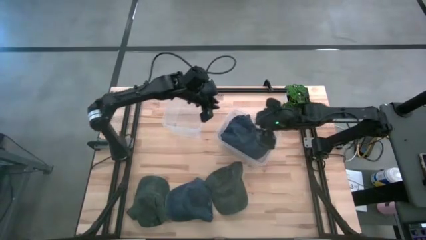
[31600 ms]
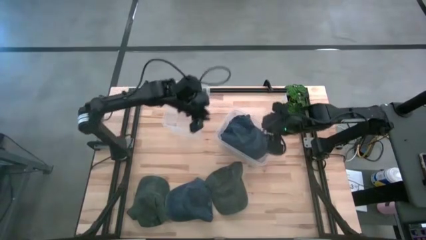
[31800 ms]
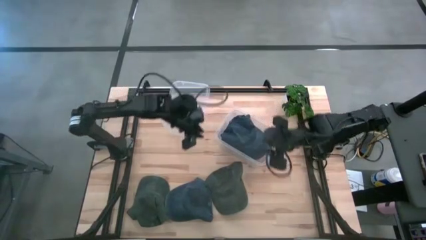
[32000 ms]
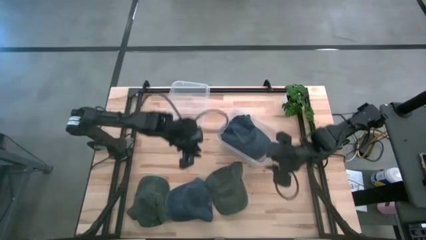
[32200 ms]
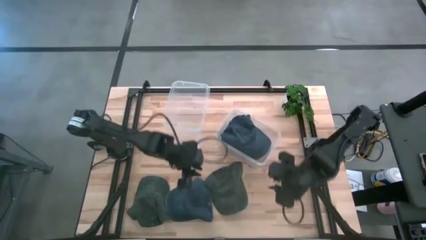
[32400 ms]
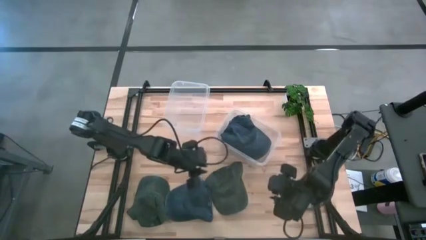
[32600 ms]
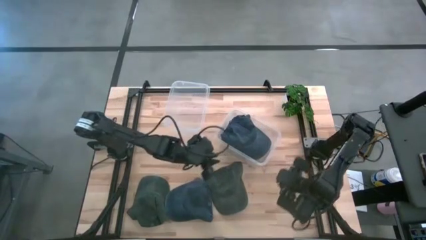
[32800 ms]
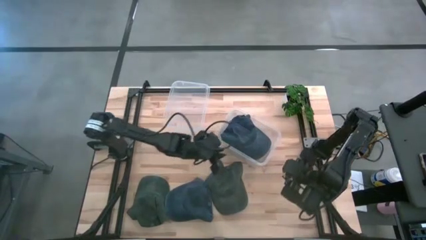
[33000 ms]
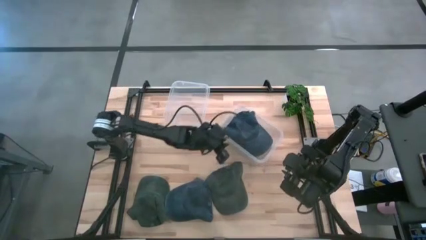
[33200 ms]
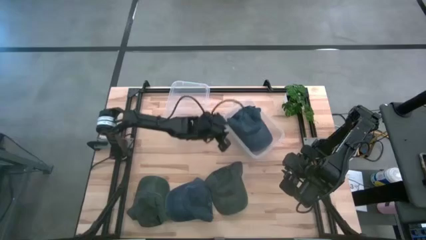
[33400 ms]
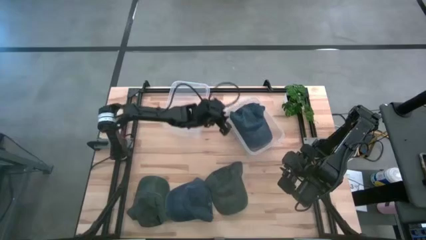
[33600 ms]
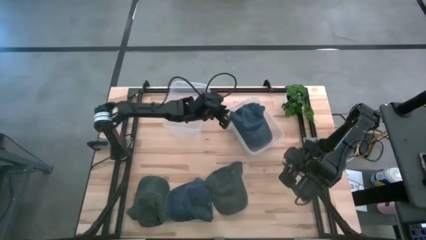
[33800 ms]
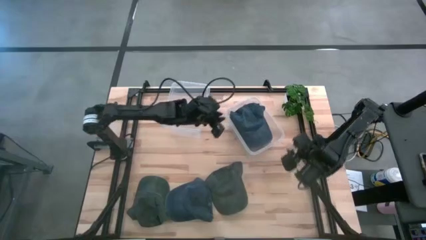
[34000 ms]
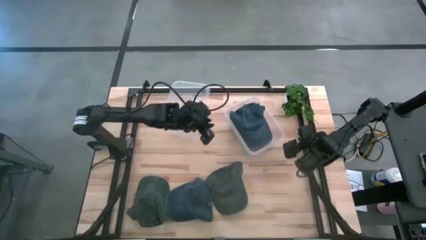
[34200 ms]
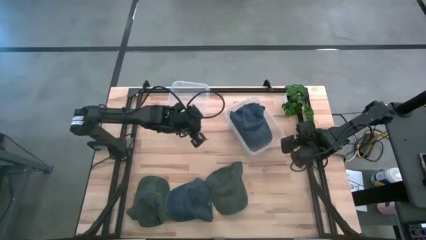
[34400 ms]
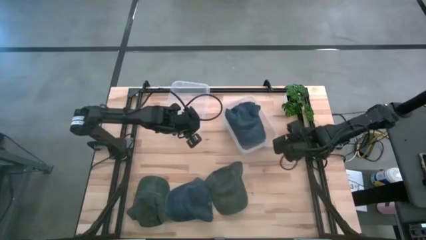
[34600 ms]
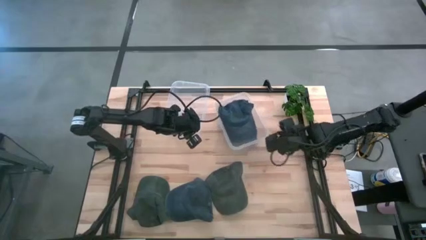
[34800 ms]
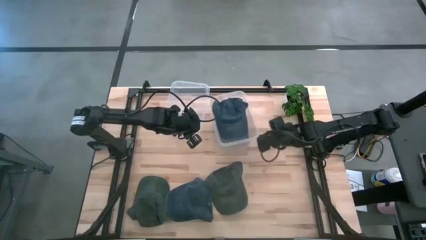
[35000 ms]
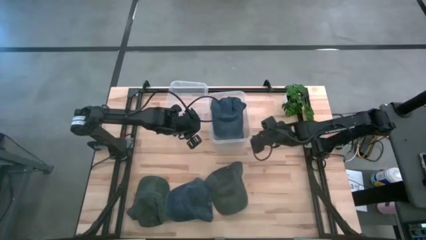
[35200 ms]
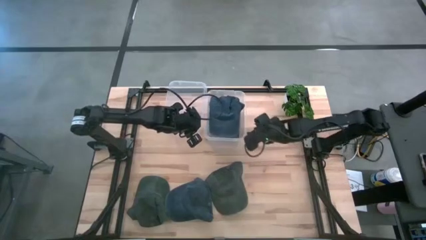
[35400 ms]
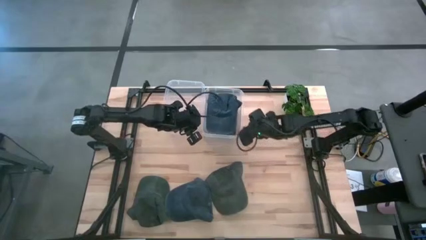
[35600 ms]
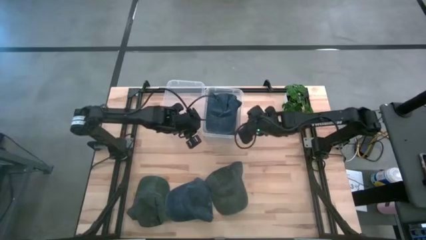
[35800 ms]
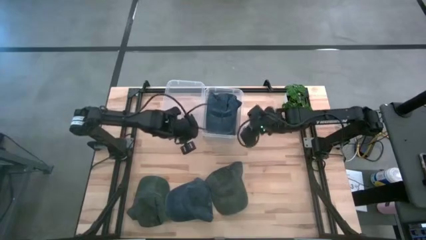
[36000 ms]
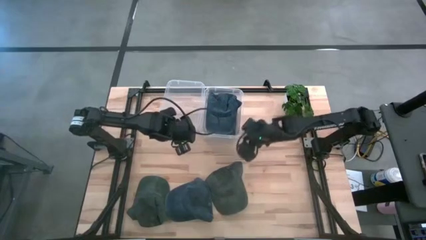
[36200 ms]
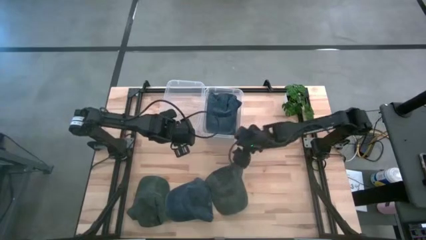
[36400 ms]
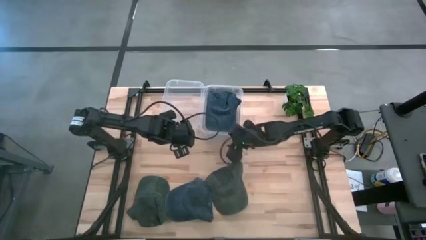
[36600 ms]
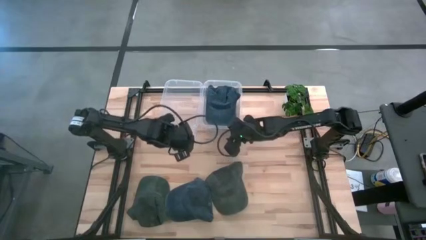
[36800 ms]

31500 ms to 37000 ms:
Task: Pick & Place hat
Adjust the right transparent bin on the table

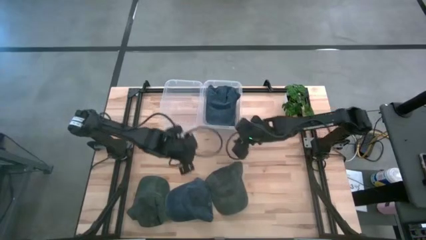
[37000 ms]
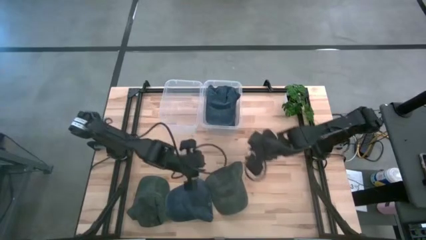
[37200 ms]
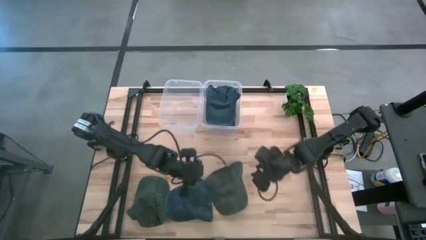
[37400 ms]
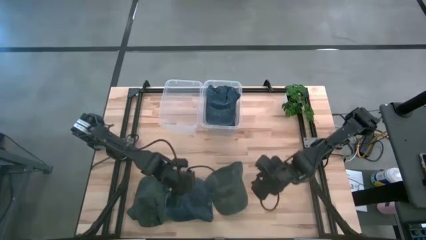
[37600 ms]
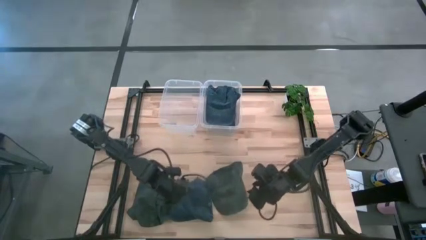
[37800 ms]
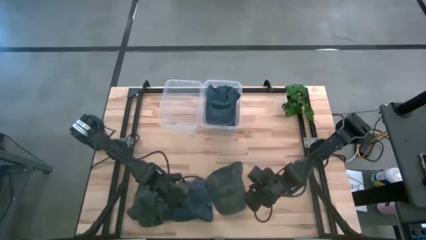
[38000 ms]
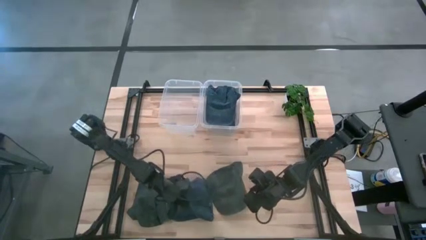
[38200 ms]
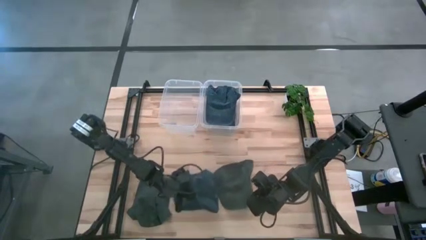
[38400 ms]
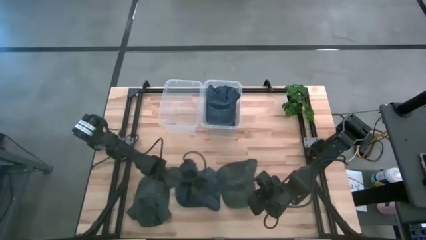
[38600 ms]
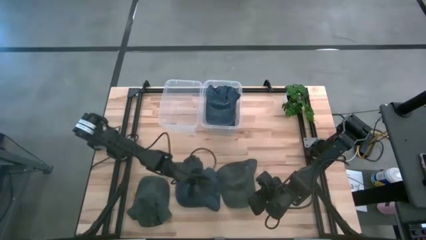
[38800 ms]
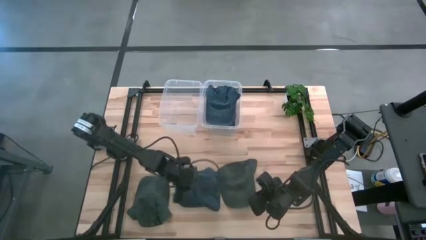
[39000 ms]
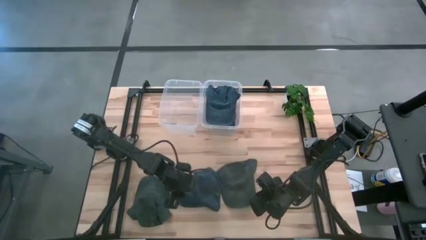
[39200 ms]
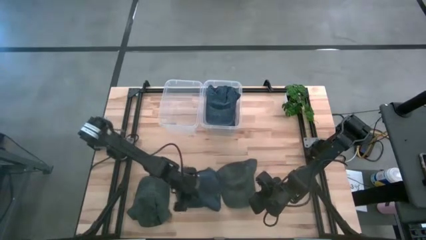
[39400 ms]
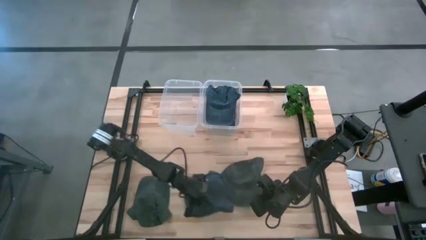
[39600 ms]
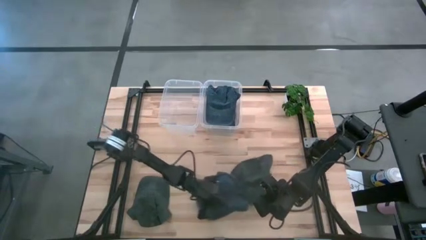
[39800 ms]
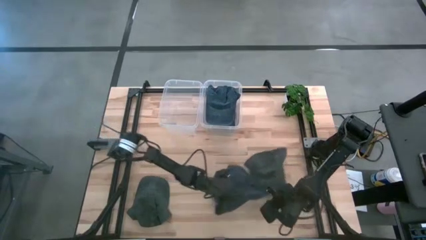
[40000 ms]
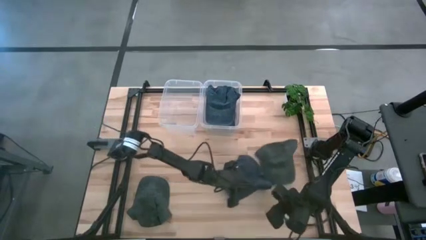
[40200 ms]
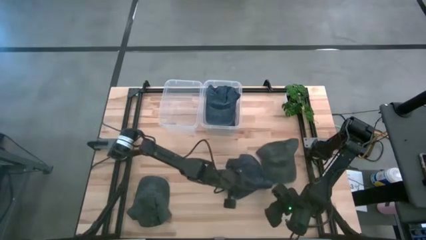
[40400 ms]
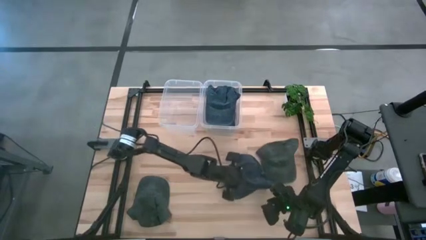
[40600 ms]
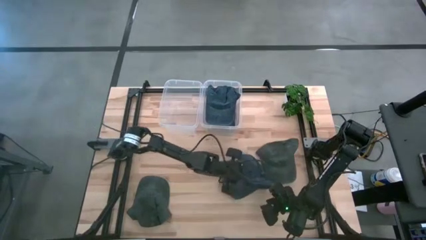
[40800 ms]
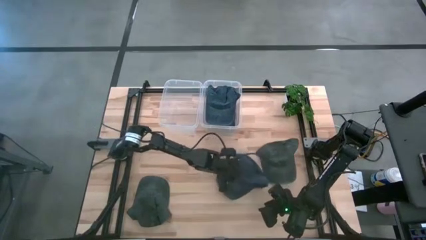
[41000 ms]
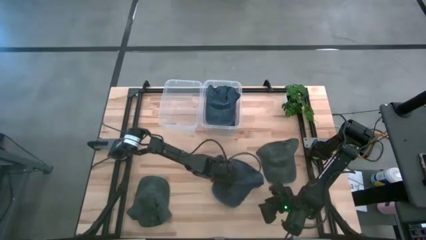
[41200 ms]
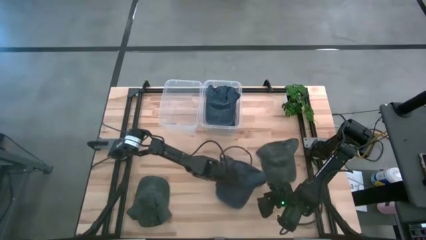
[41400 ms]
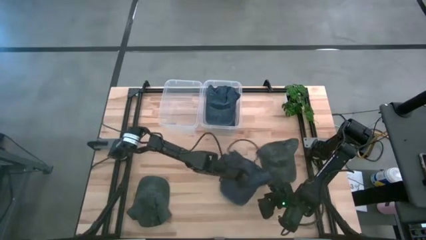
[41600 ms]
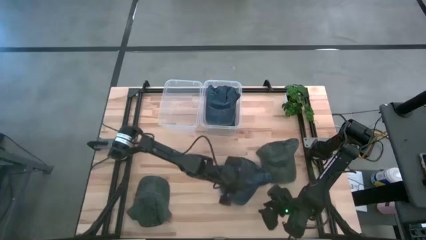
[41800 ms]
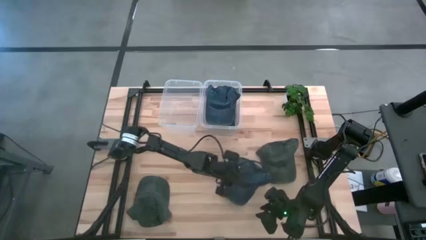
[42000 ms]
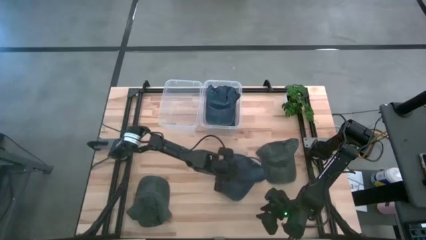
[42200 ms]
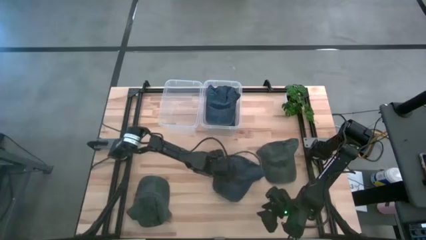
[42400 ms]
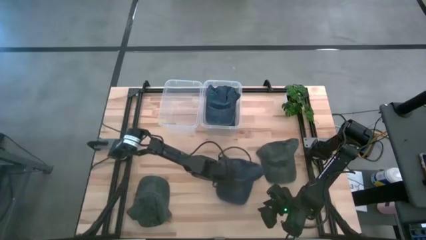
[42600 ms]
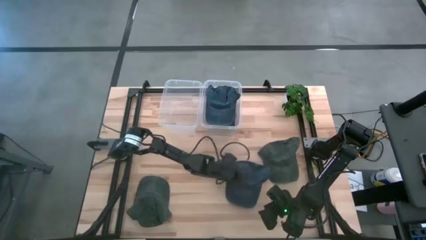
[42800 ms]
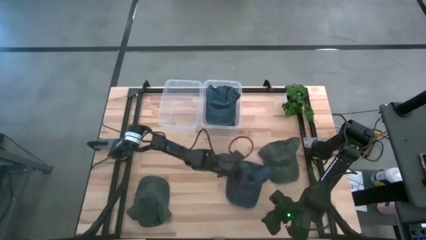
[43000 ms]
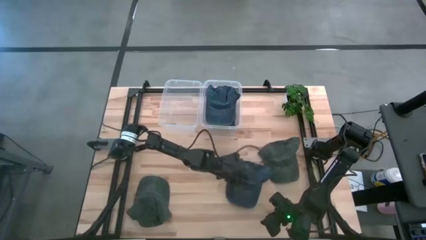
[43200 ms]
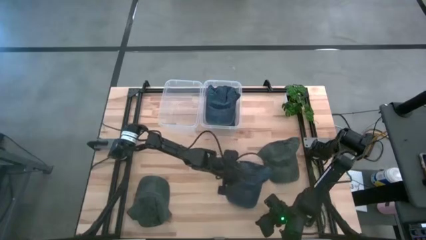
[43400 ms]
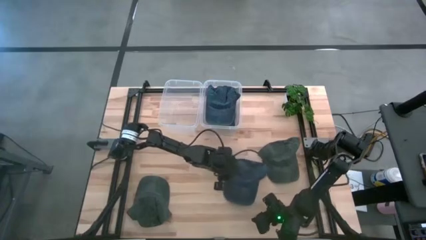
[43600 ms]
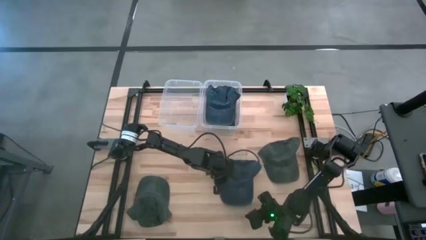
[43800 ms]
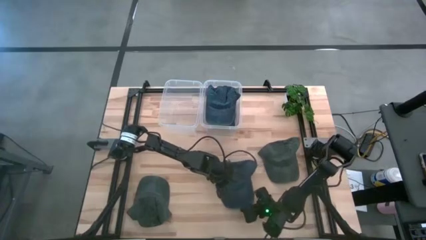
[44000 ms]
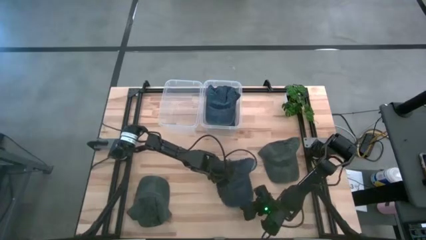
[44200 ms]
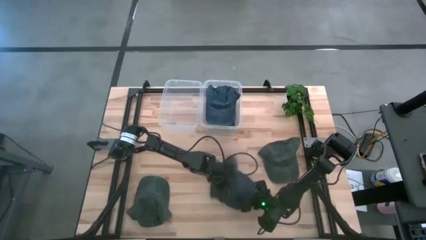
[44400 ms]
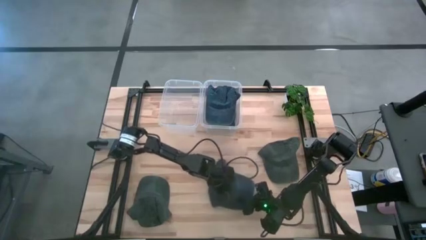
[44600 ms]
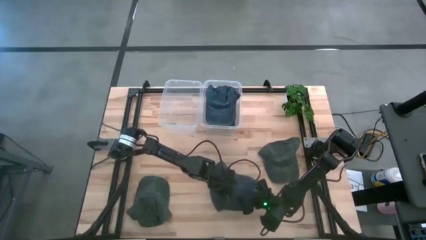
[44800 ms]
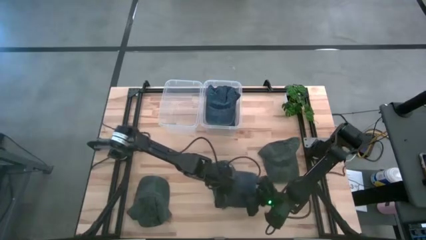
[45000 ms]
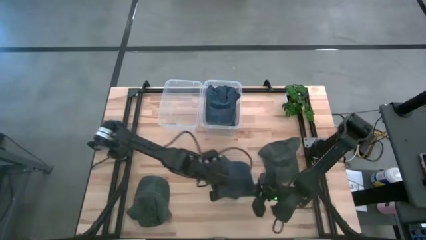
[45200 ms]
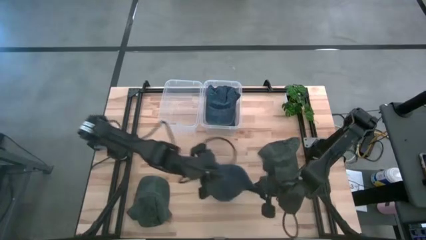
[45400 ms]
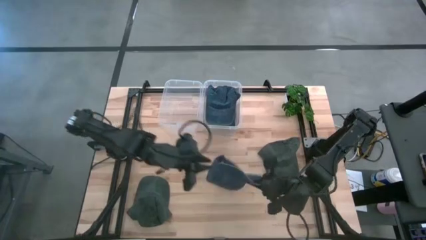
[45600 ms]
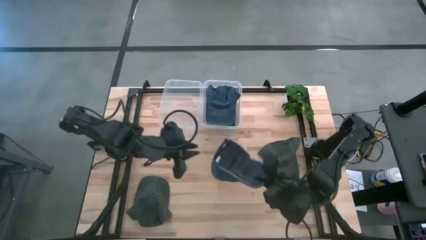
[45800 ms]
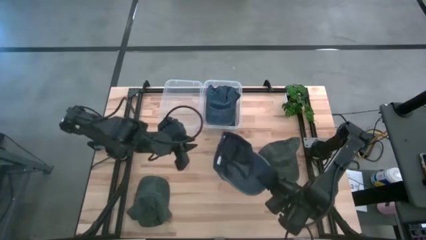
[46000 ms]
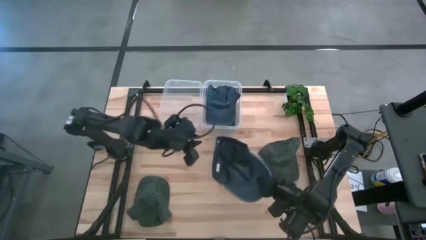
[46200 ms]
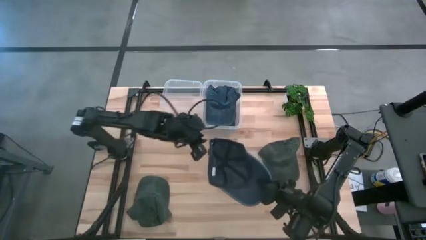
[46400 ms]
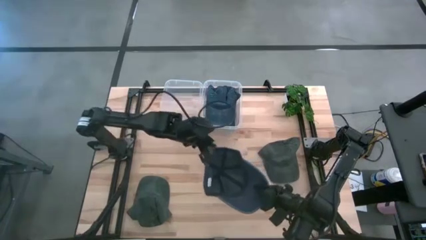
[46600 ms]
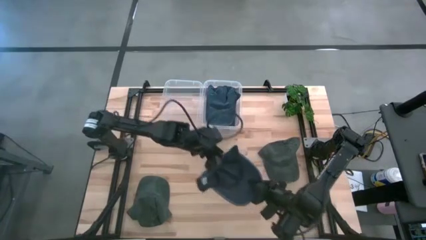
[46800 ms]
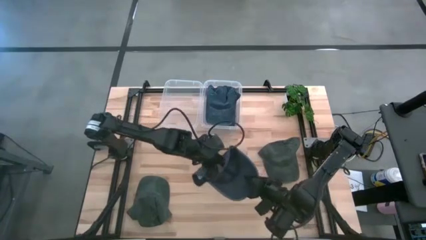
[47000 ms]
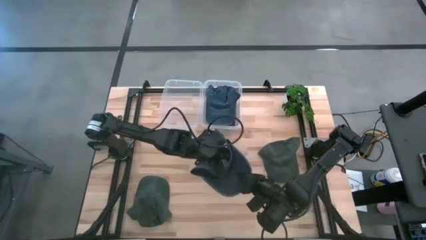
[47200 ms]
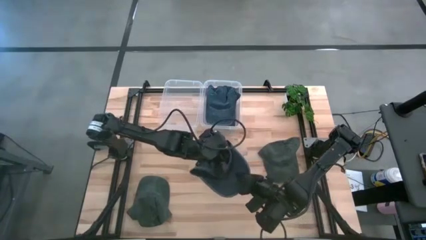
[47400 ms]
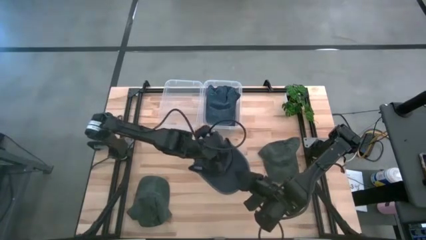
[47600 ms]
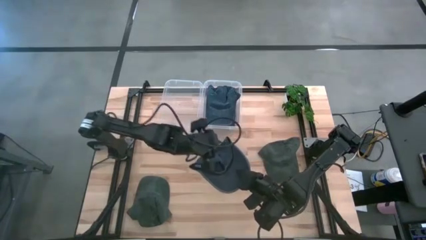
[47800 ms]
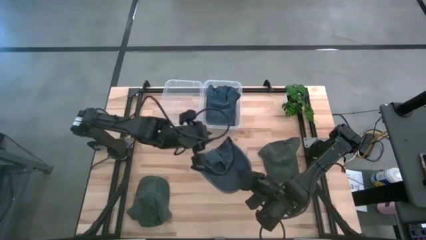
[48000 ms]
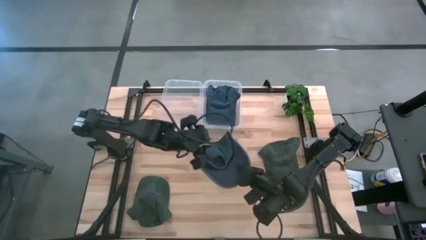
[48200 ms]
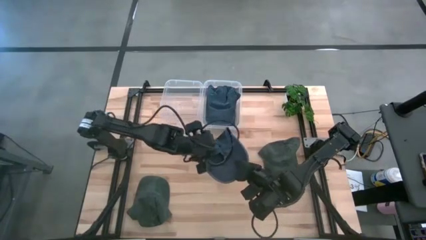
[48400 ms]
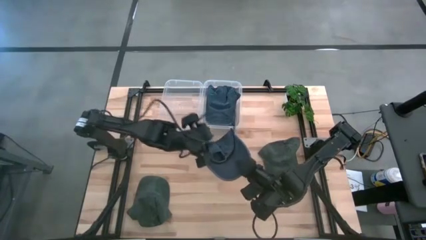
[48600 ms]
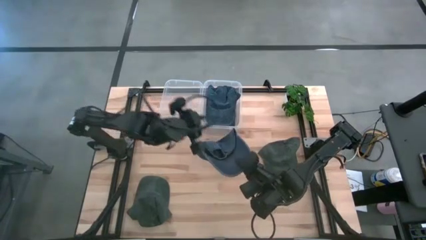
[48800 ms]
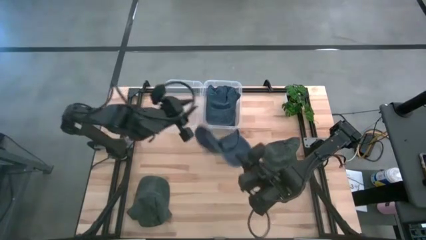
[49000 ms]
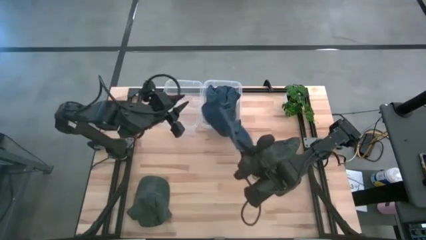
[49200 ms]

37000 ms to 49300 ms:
Put the blue cap into the right transparent bin
